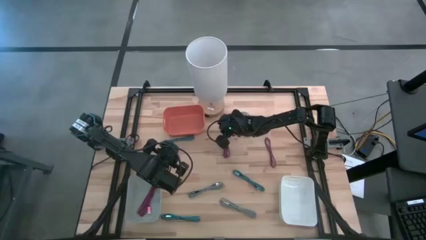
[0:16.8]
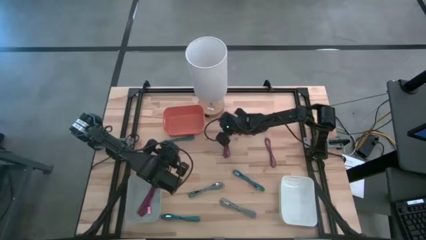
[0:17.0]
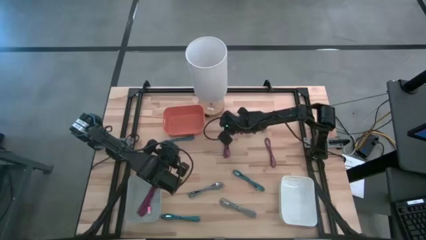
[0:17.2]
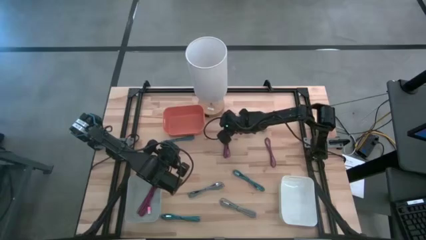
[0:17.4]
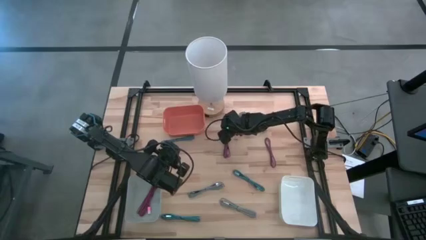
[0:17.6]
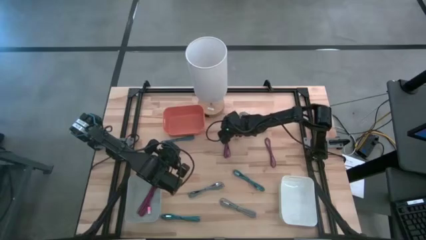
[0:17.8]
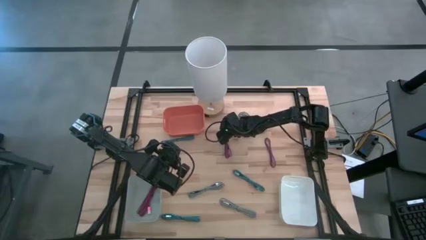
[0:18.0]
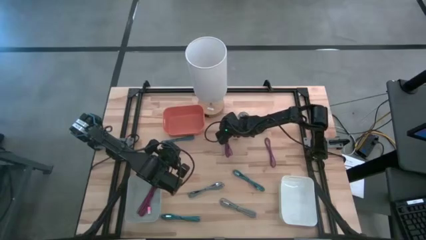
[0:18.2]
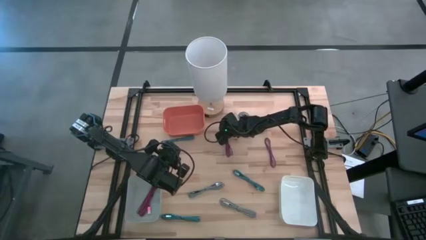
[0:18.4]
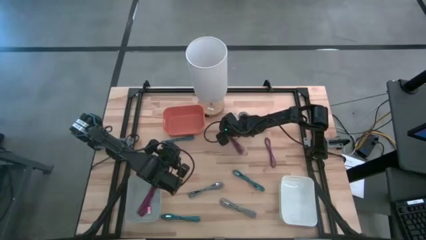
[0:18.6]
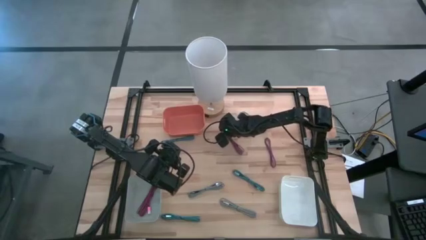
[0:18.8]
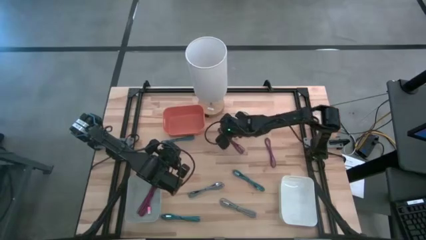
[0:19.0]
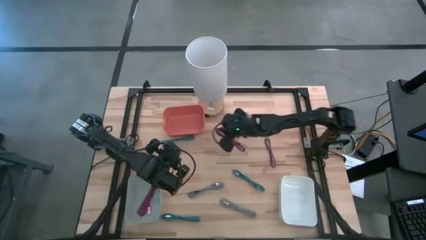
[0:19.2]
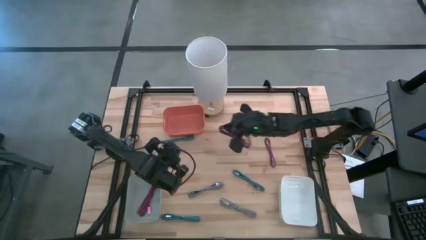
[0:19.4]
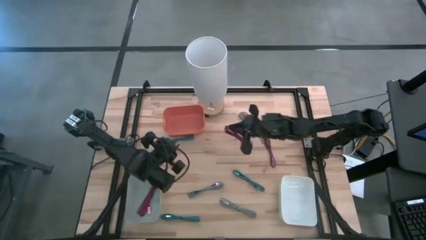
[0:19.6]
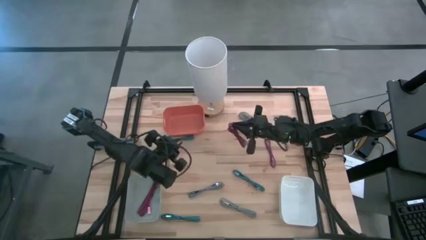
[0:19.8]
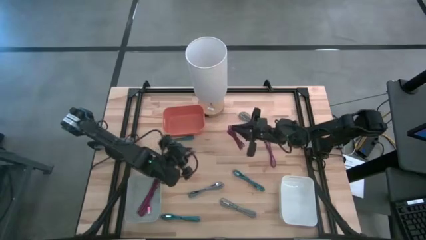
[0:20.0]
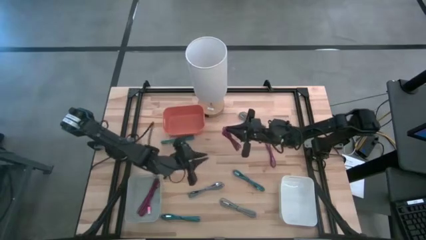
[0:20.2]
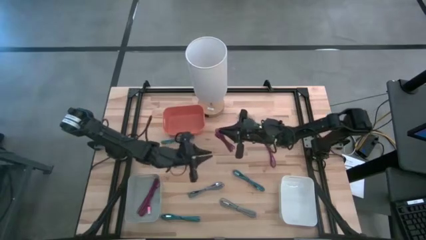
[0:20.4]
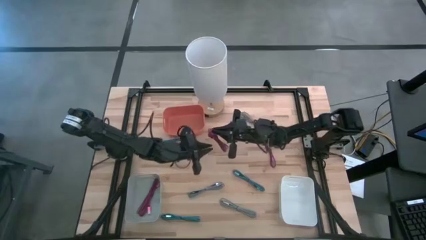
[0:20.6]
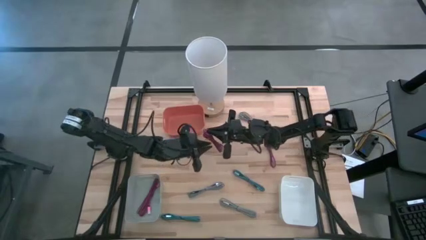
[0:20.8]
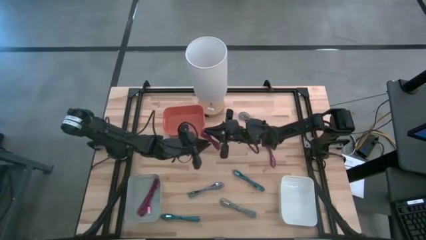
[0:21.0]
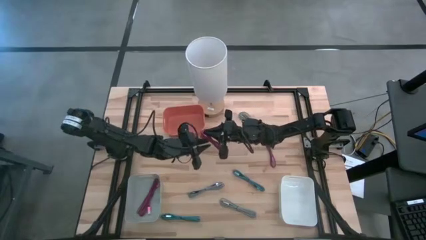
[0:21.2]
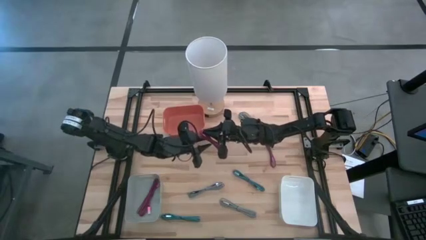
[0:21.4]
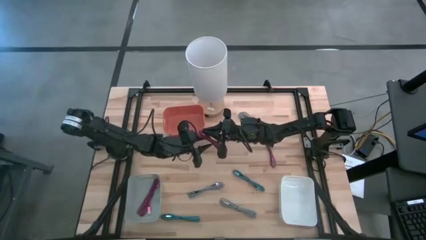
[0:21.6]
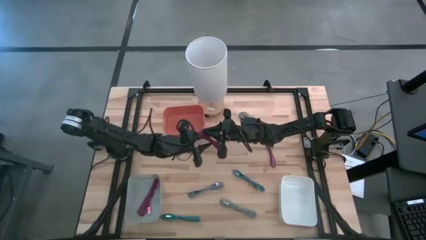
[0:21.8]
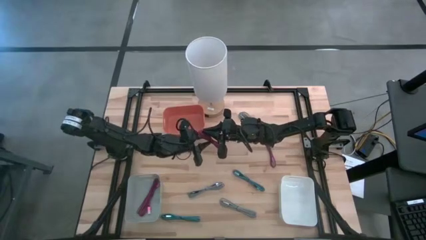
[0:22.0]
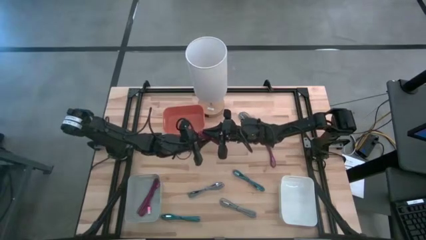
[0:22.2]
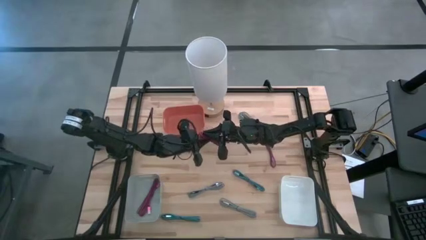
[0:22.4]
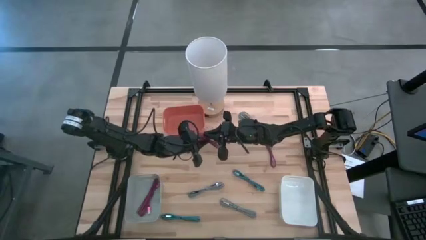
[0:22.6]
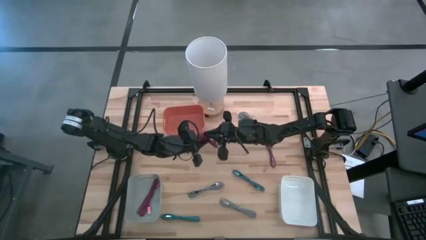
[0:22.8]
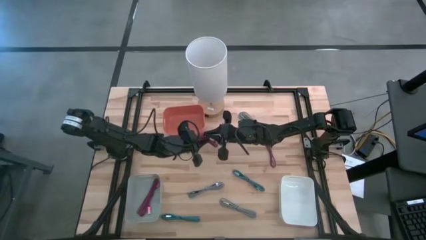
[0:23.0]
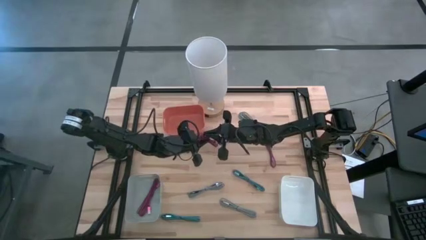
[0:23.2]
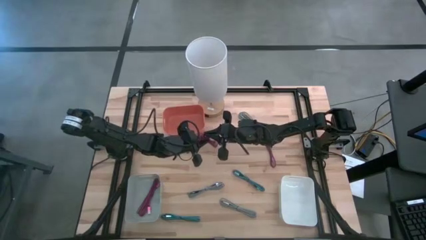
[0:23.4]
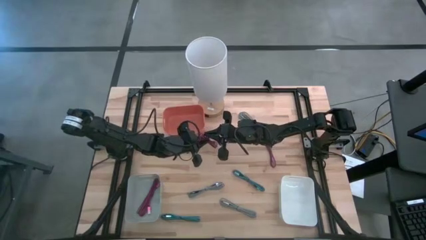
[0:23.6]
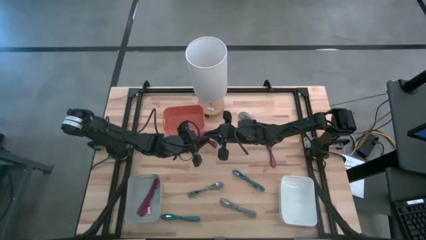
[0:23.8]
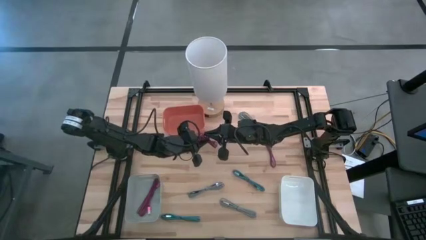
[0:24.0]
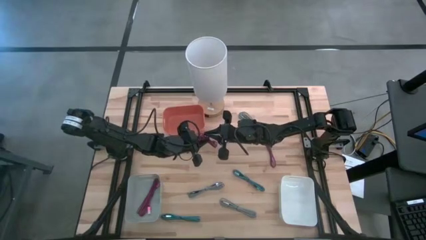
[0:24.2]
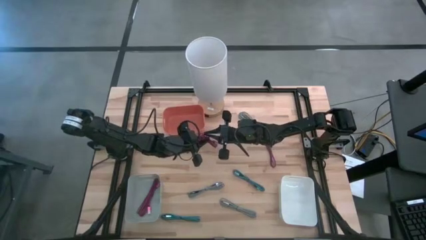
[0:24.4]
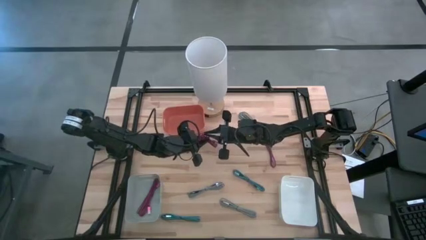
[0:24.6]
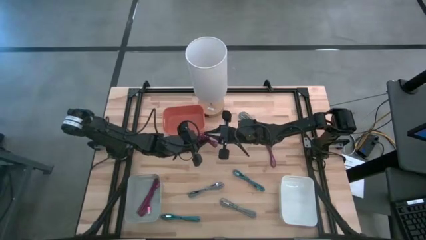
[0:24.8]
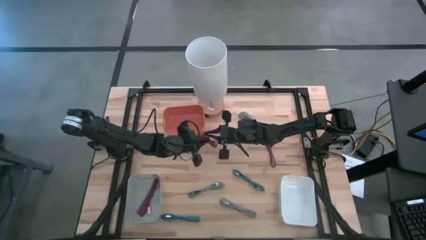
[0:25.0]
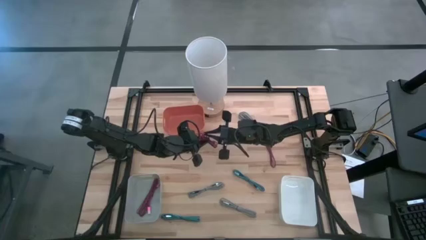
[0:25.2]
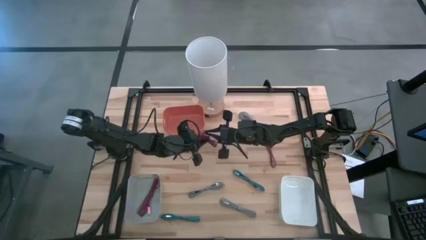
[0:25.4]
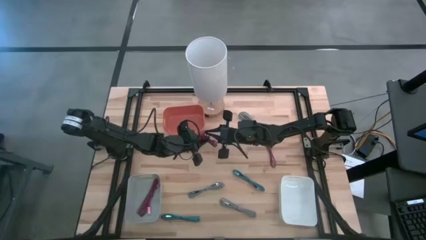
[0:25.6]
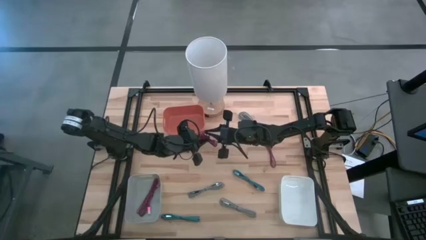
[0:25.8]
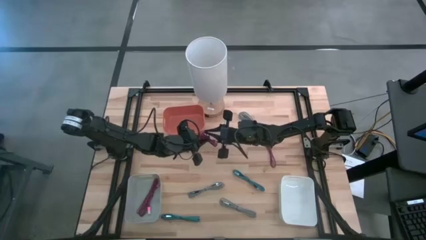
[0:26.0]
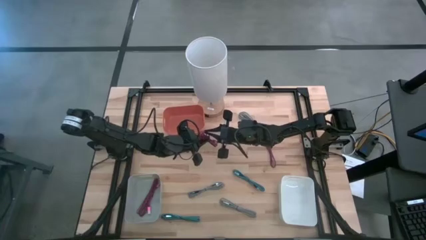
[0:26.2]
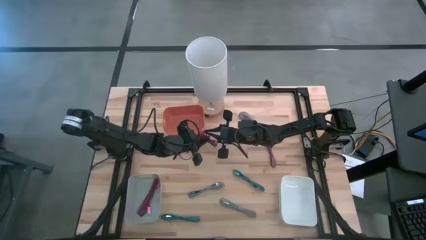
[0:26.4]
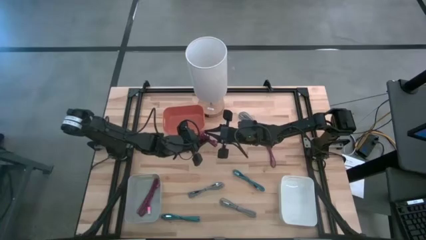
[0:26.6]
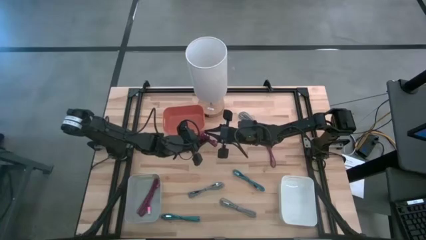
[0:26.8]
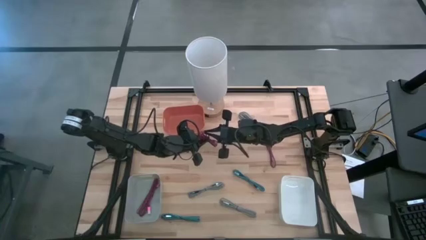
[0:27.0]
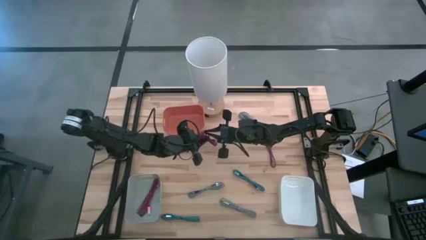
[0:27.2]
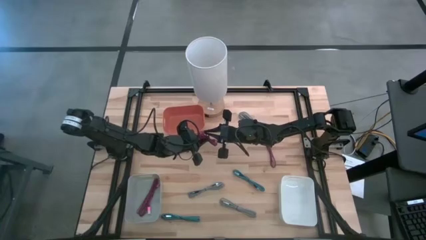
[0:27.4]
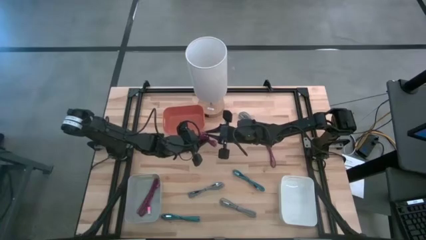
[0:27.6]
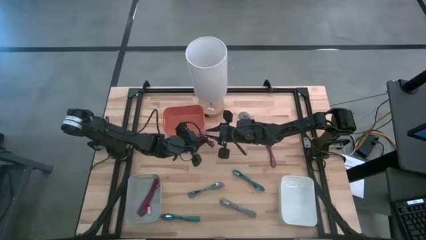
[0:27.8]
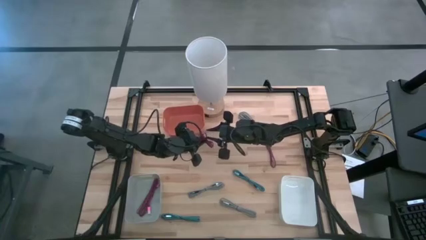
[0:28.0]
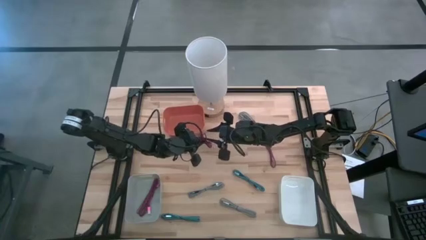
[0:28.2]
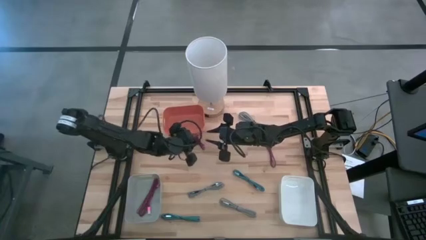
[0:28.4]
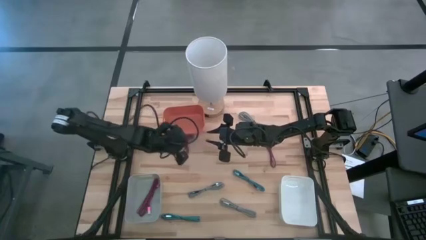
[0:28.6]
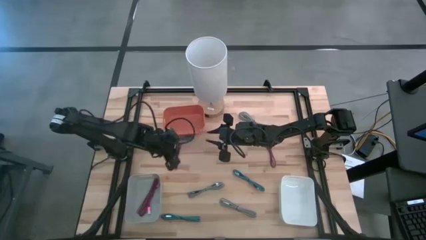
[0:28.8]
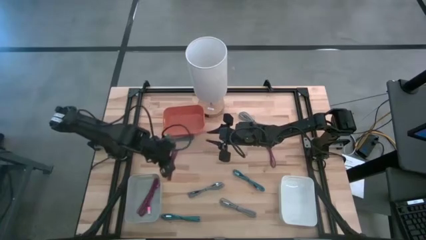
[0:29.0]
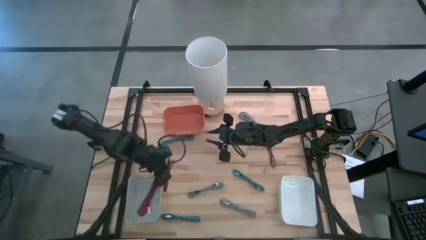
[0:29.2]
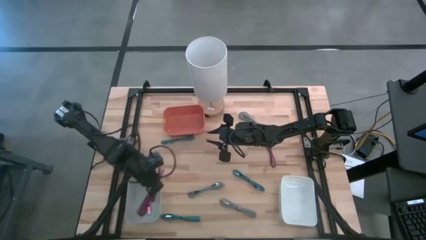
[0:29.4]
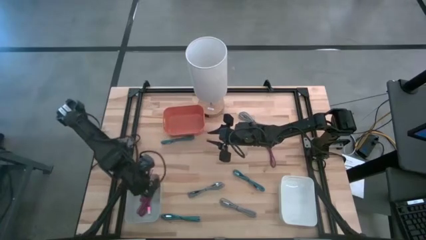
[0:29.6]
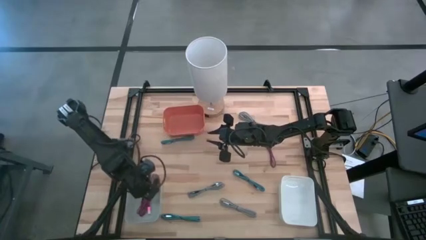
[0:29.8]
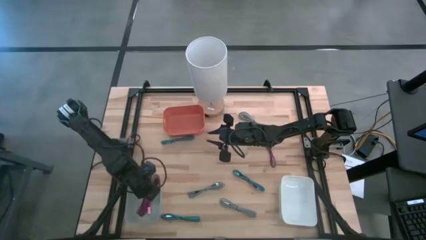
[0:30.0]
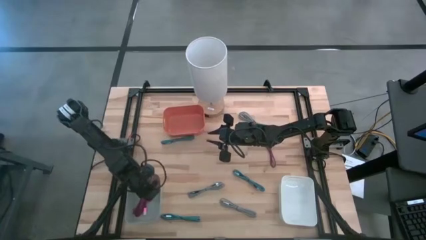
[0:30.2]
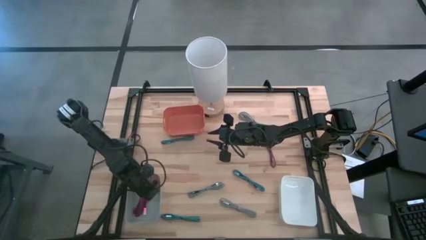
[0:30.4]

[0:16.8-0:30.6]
Task: Pick & Place USB Port
Put the left pink charger cable into the gray bin

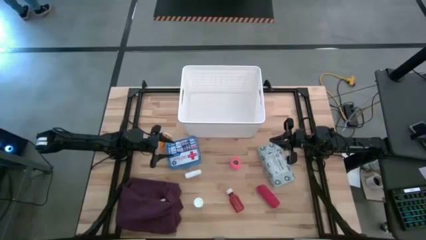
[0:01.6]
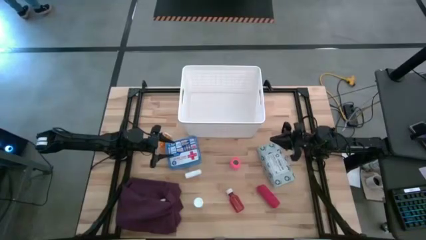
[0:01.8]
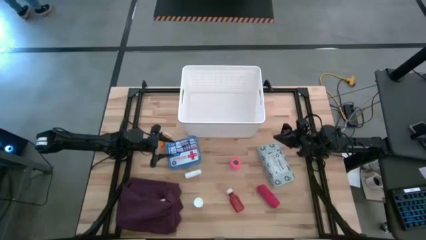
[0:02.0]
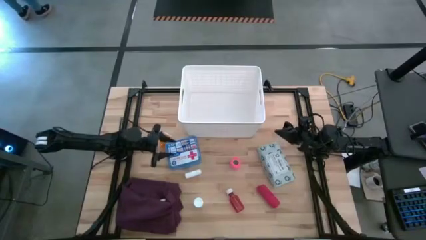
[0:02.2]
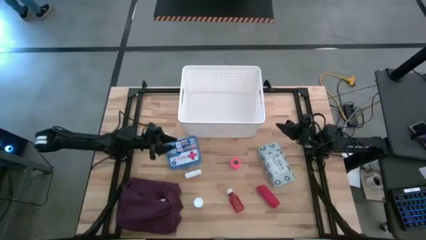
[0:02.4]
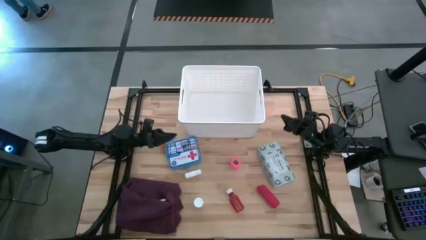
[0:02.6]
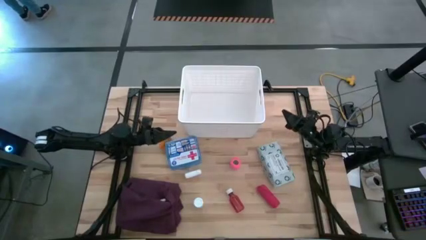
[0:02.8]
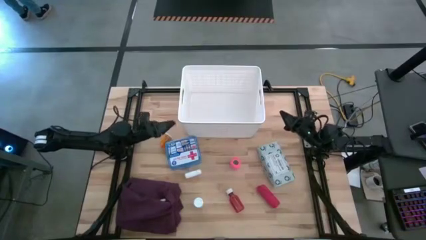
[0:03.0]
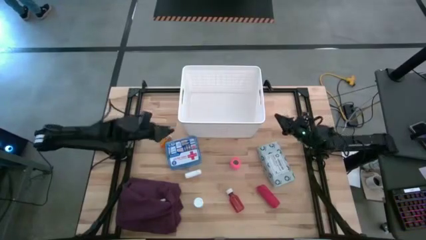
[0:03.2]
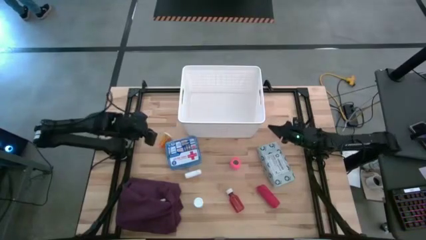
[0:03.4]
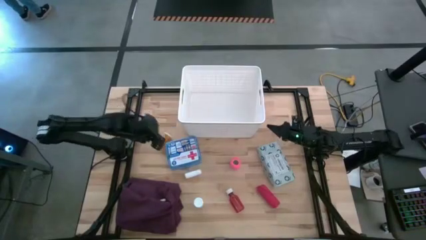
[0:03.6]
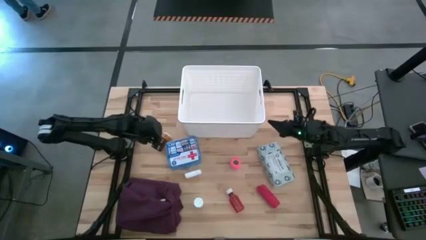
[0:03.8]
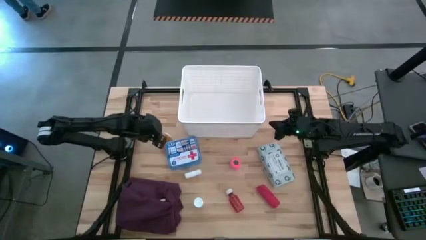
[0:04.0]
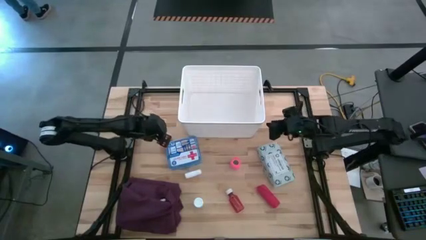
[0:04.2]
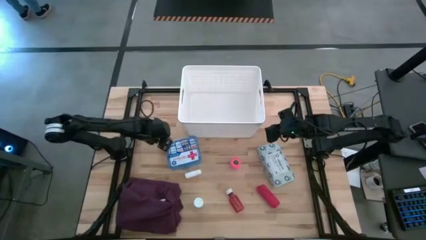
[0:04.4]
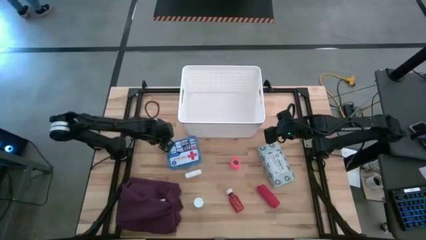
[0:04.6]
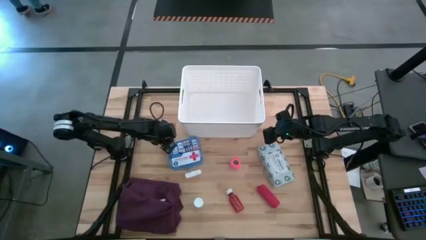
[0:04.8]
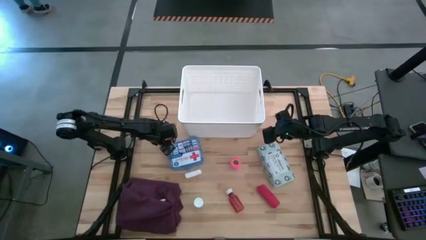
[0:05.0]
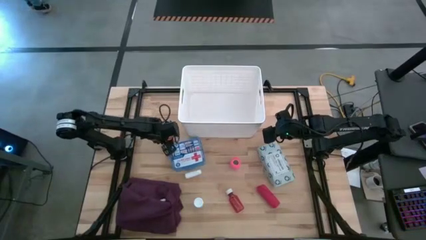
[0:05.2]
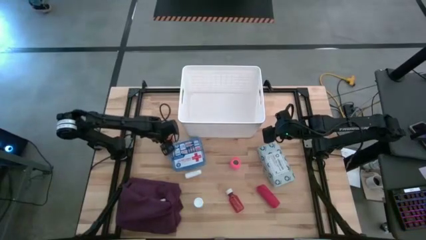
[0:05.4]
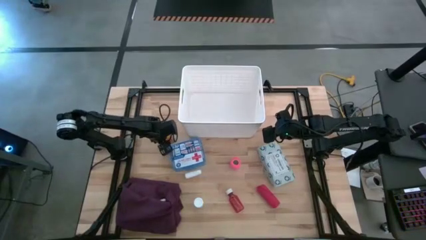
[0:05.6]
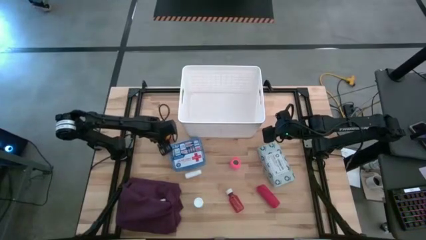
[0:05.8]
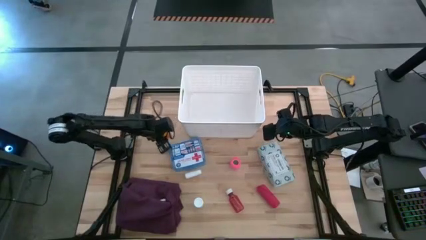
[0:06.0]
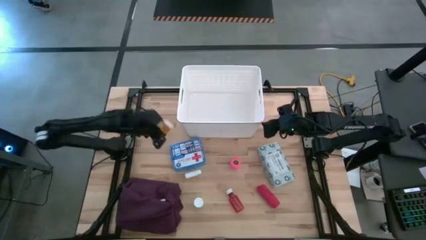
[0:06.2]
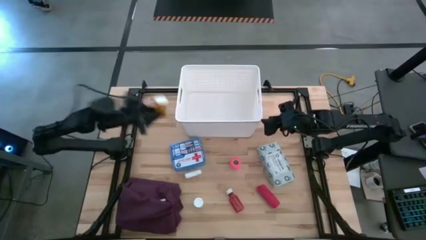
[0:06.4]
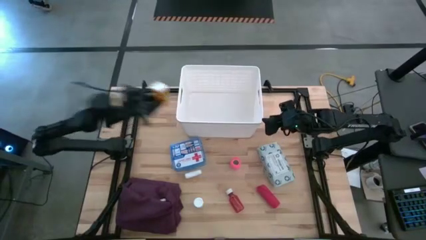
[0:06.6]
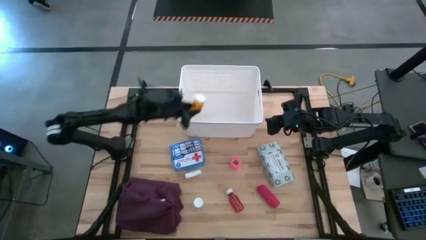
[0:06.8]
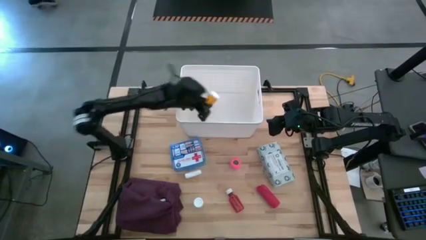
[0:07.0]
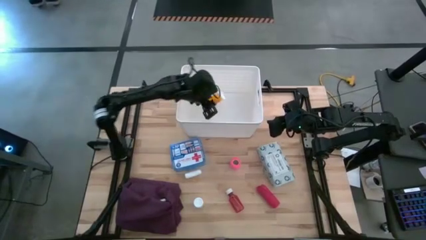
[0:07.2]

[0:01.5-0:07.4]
Task: Pick & place medical supplies in basket/bin
Put the yellow pill bottle into the white bin
